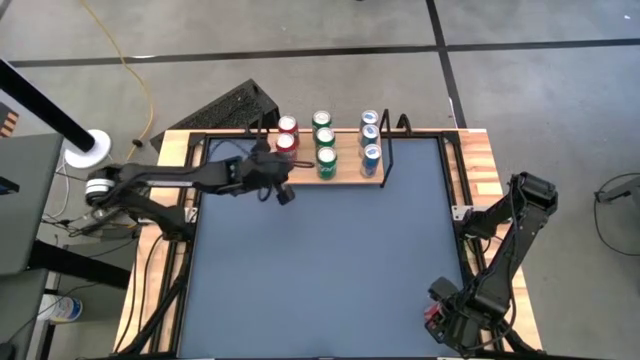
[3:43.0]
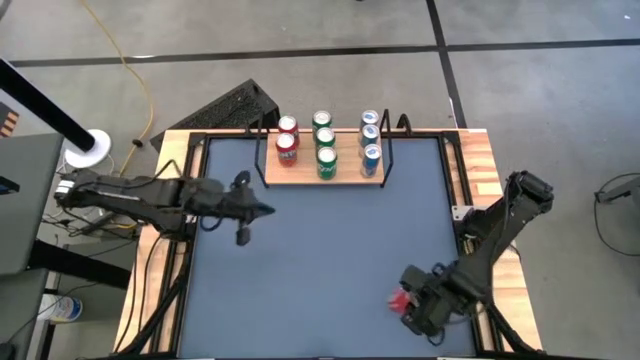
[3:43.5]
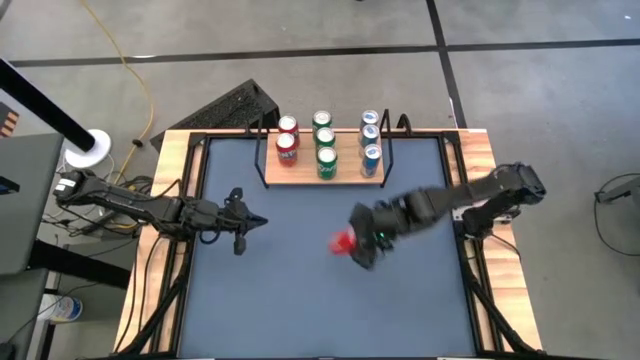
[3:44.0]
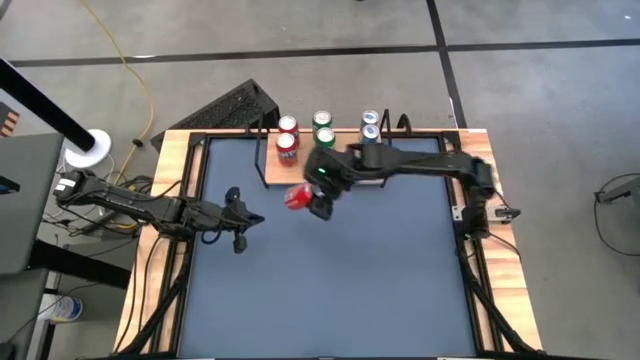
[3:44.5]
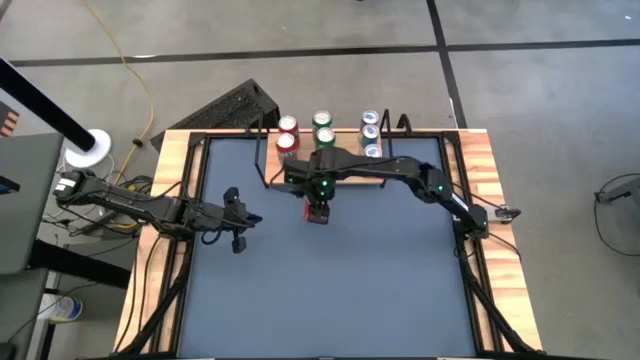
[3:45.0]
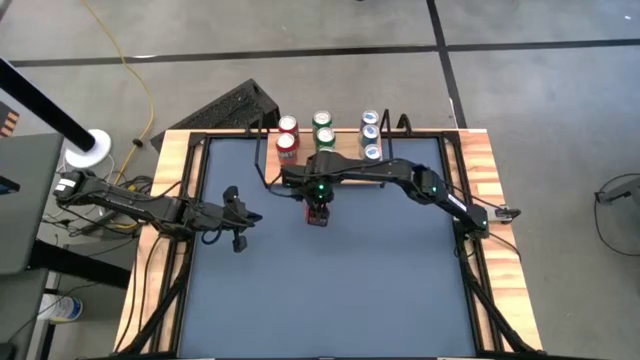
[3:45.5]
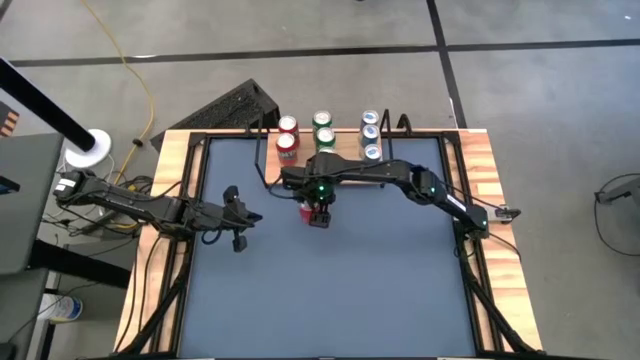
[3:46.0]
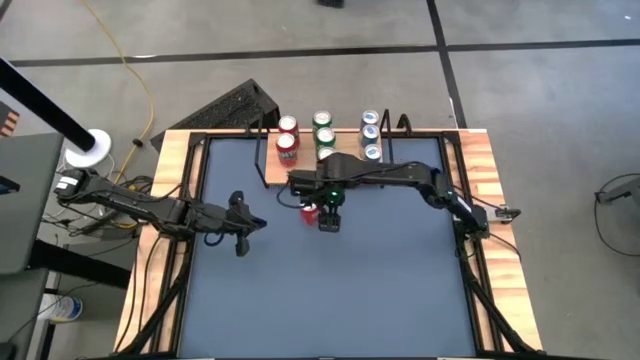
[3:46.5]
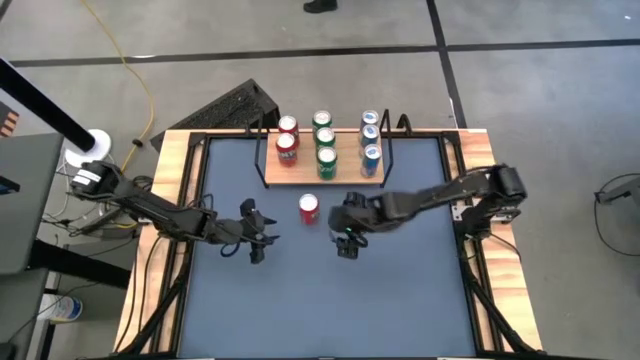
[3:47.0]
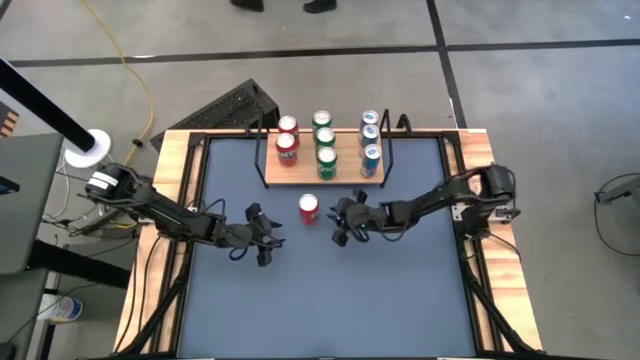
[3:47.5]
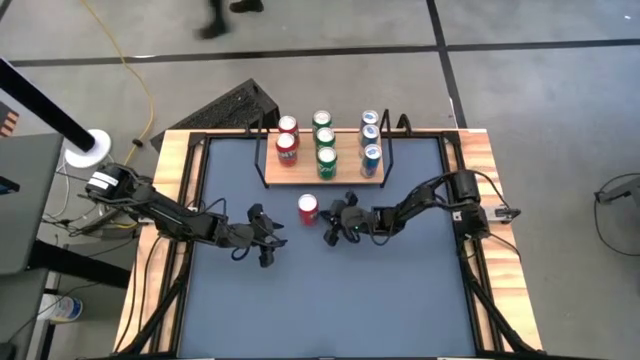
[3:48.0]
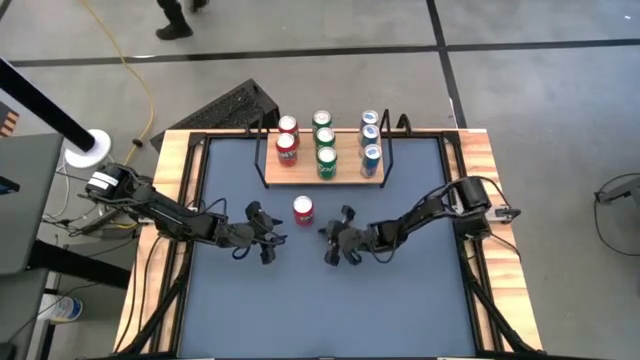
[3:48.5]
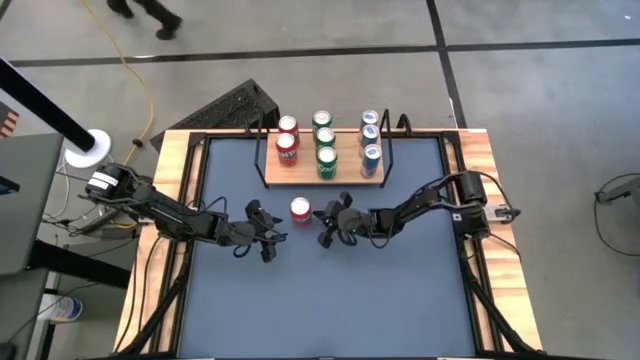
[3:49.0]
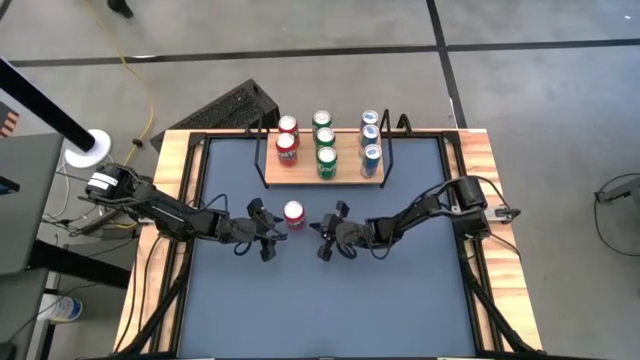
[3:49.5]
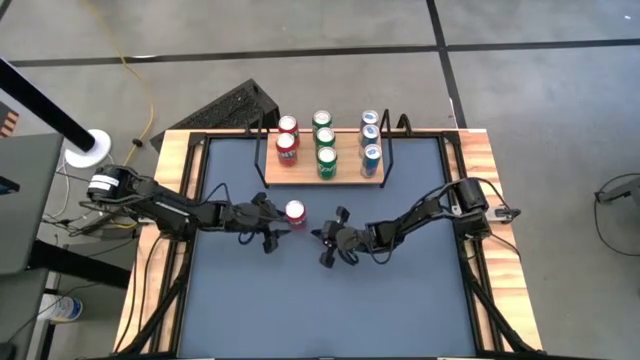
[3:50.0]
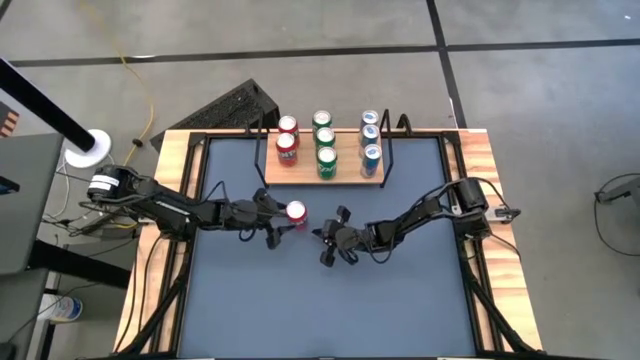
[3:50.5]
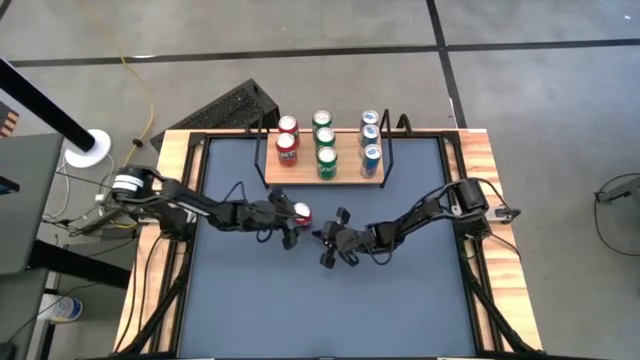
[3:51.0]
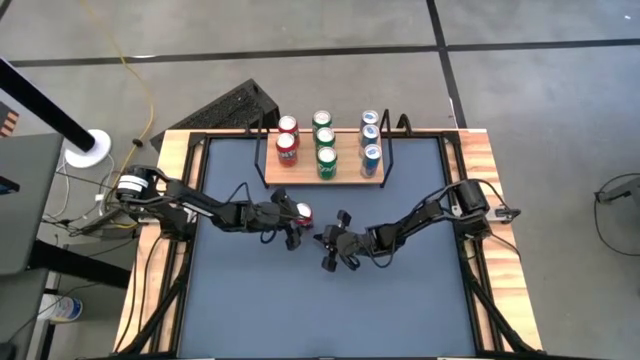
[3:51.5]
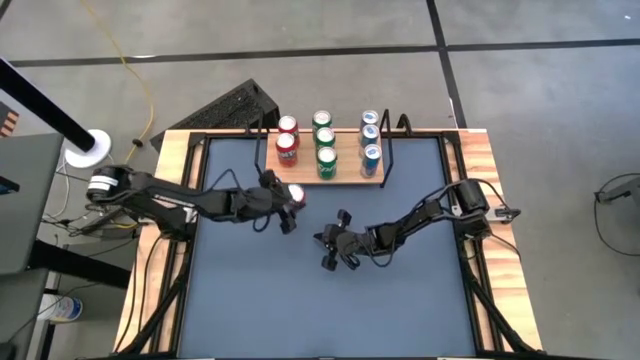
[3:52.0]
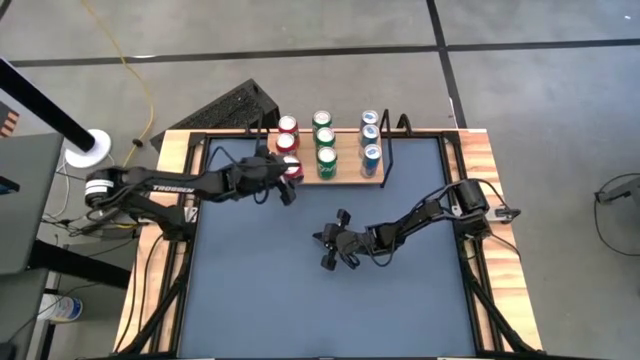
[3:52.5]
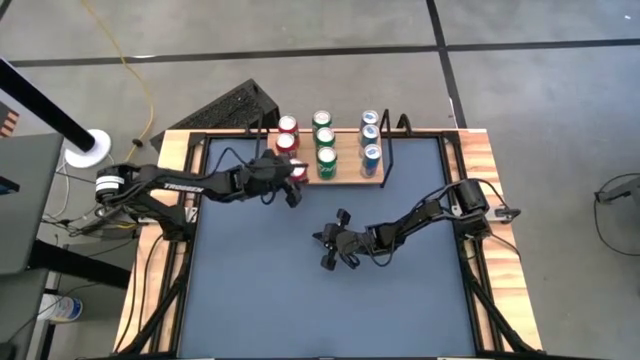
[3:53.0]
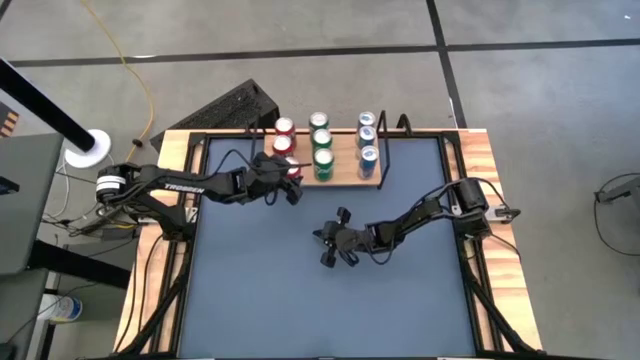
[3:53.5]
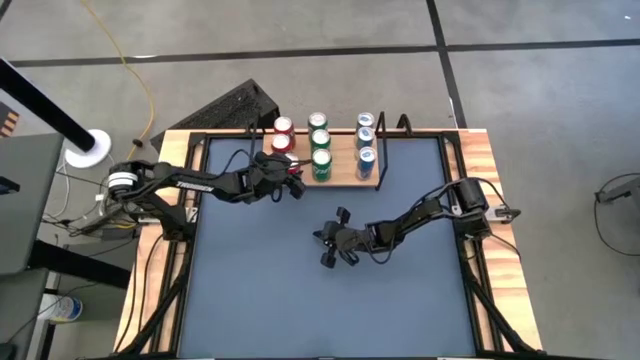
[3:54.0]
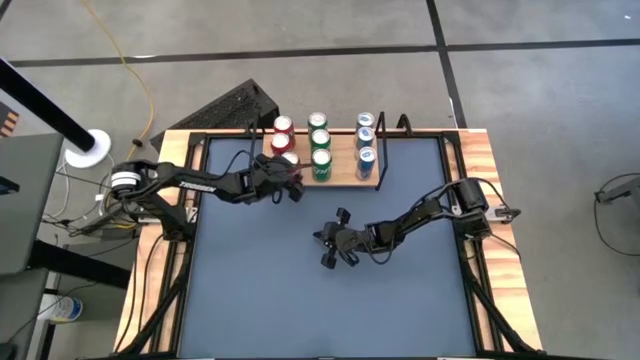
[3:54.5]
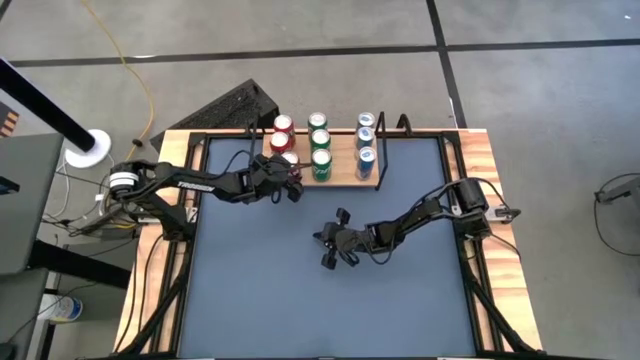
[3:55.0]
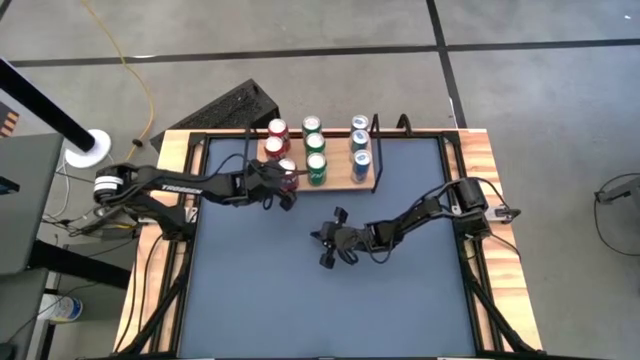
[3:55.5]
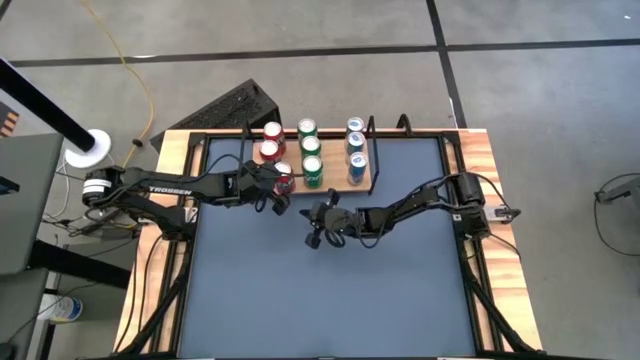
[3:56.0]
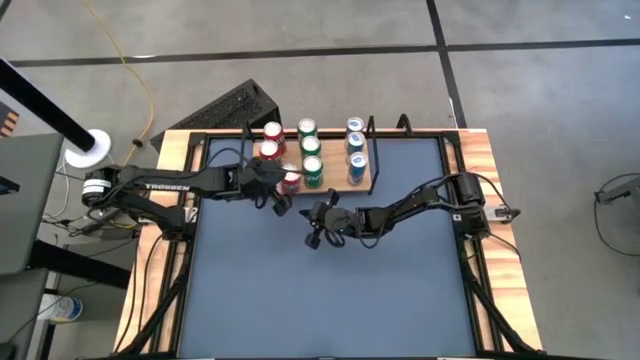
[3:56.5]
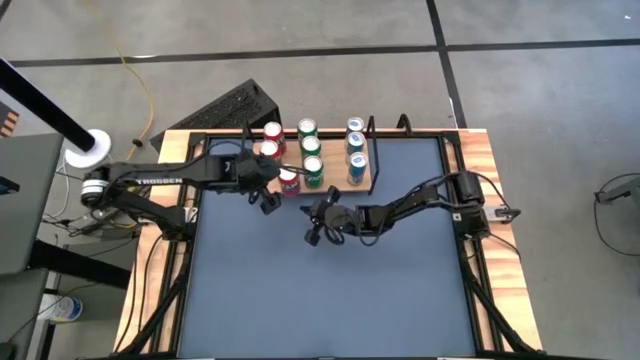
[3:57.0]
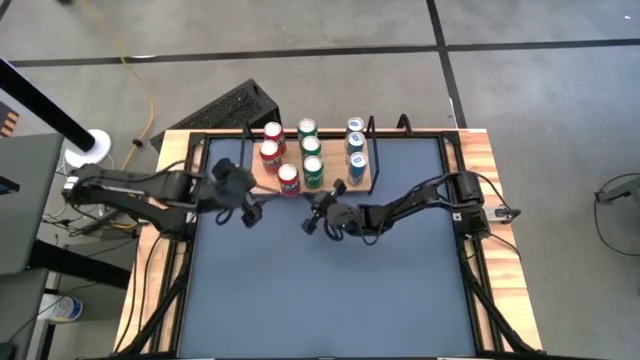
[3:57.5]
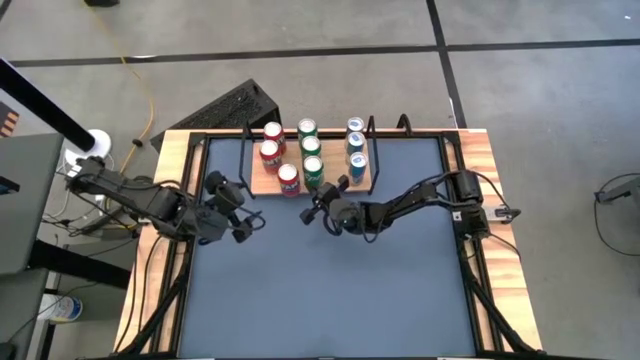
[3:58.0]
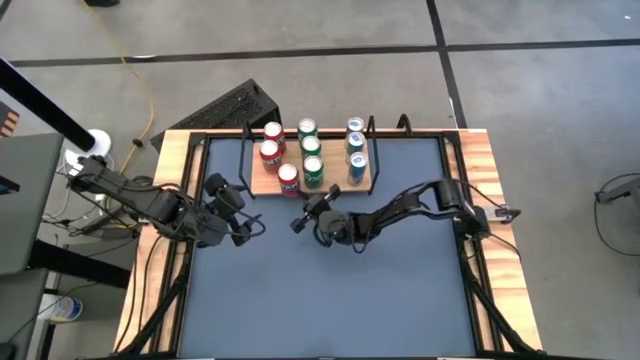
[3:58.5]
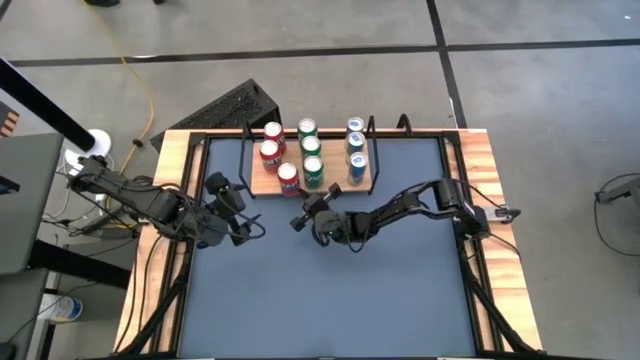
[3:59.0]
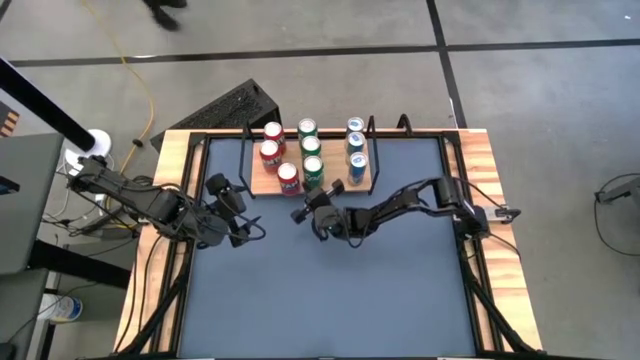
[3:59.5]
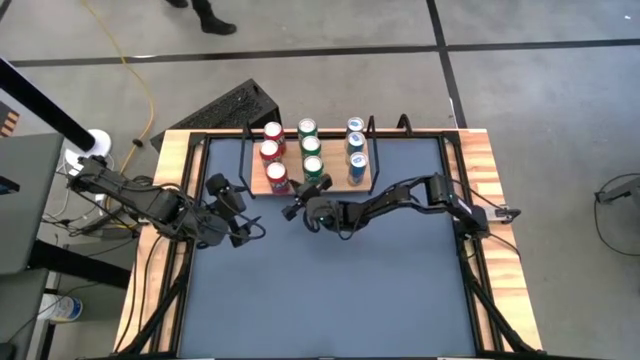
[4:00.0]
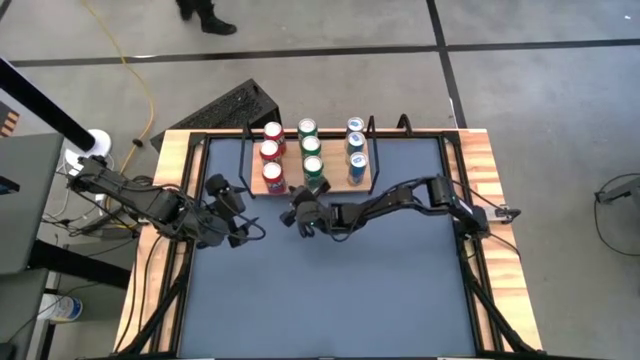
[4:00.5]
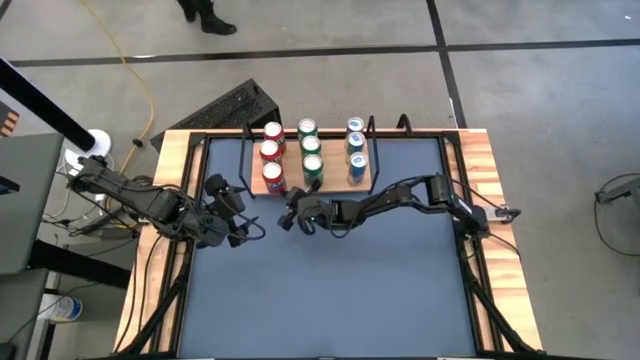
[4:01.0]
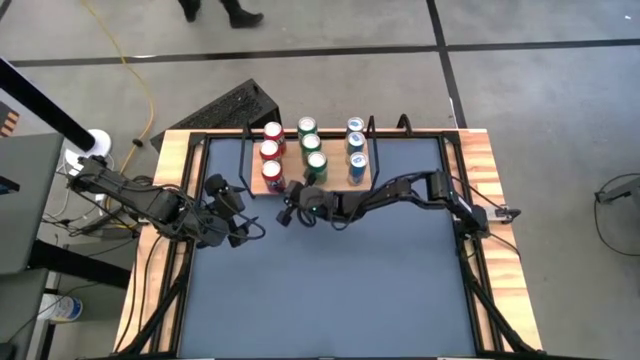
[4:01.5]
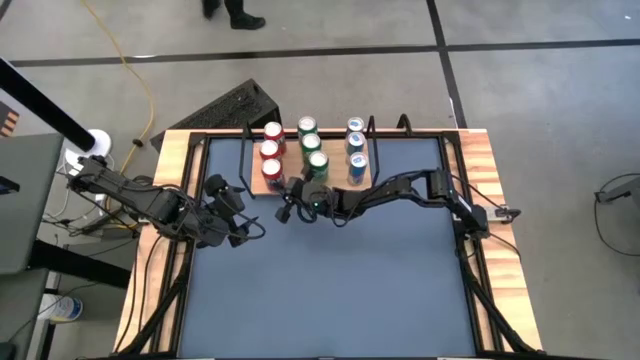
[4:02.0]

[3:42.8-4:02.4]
Task: Place canned beverage on shelf
Put the red soda can on the shelf aligned with the other red soda cans

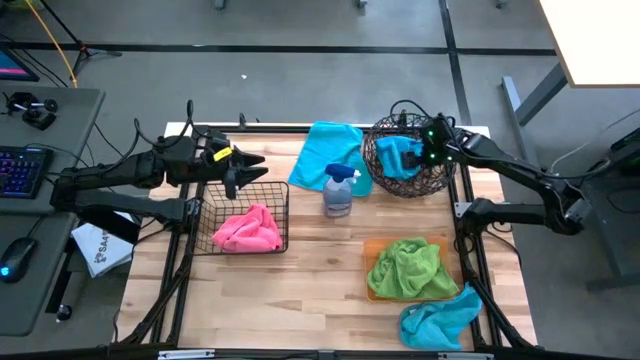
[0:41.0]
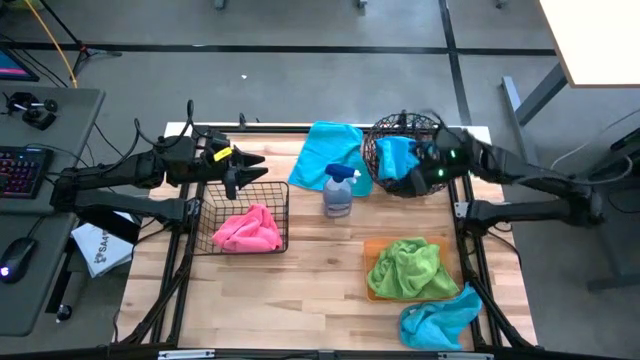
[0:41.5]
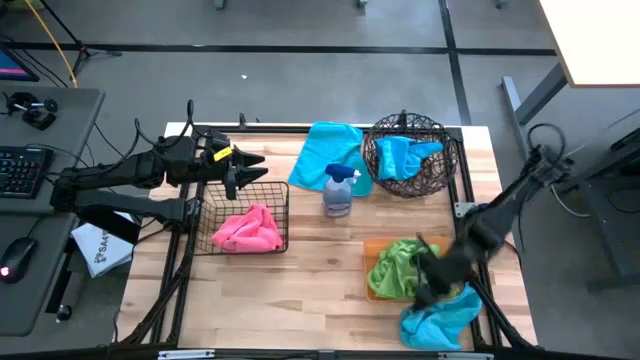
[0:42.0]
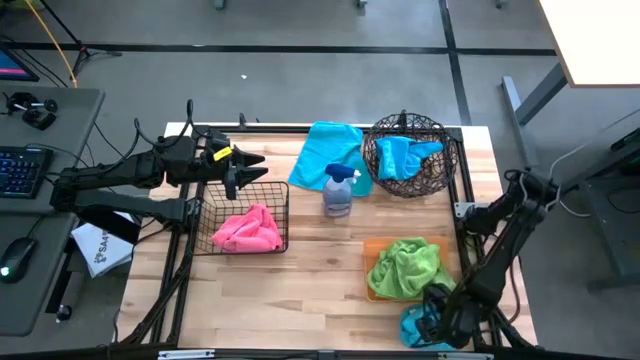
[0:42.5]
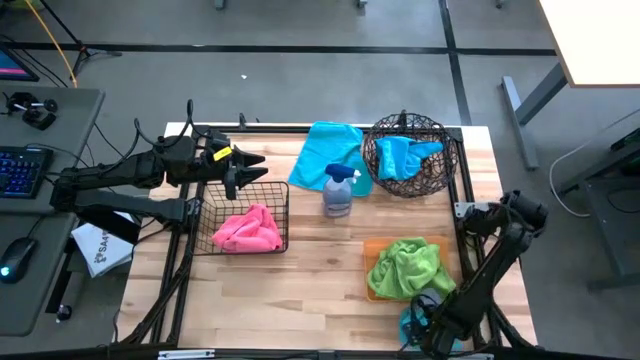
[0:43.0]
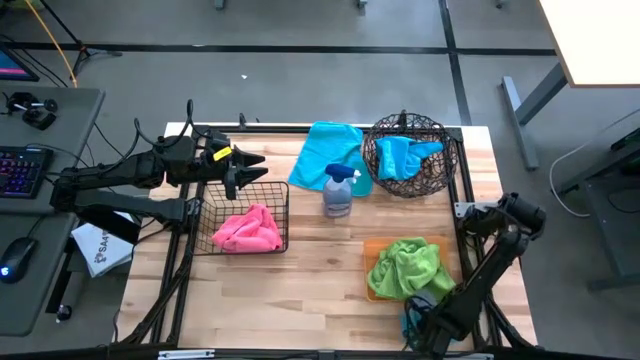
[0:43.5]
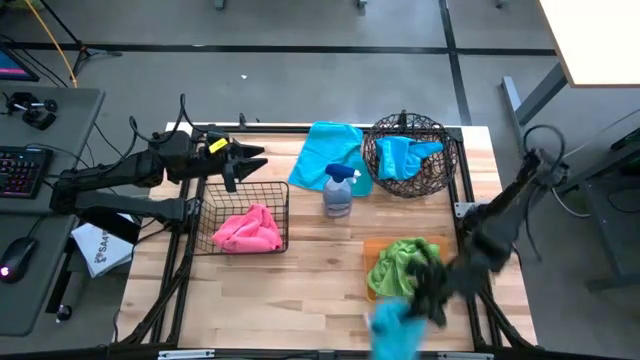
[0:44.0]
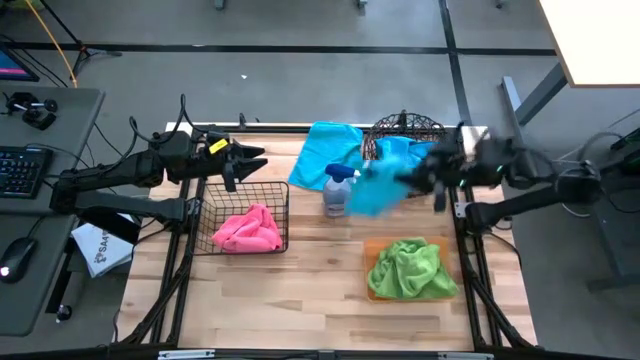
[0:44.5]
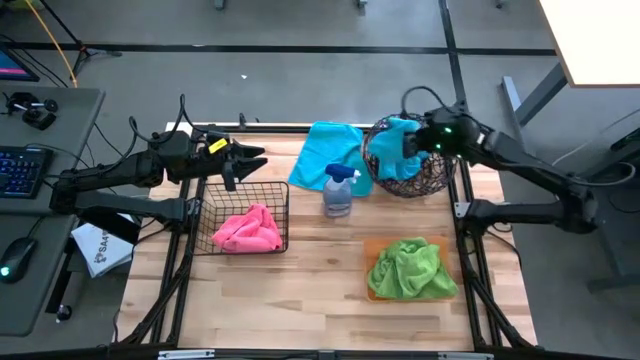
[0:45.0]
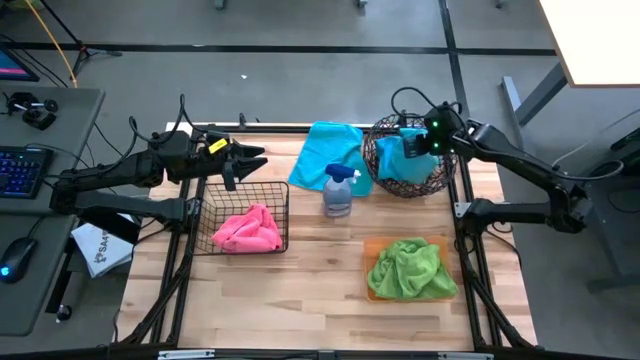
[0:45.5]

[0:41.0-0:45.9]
Task: Sort microfiber towel by color & place in baskets
Put the bottom blue microfiber cloth into the right wire basket
